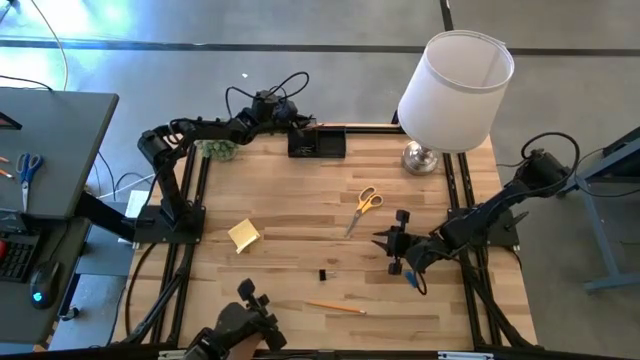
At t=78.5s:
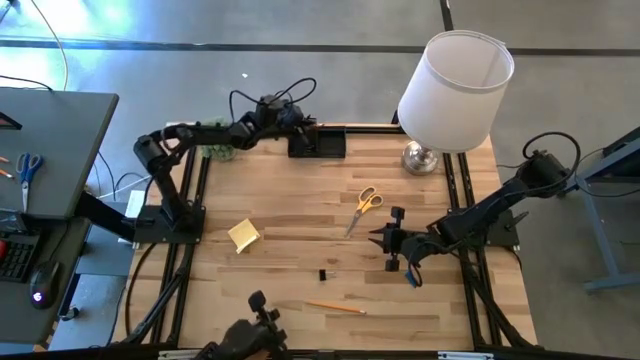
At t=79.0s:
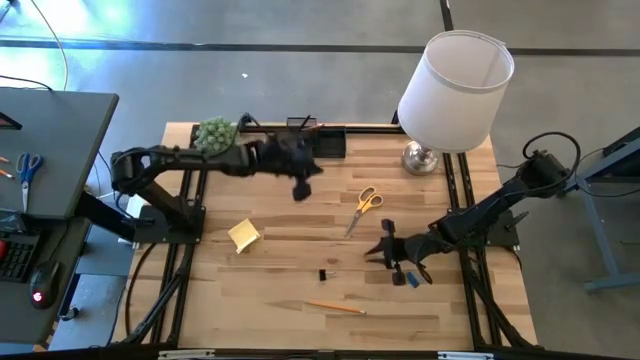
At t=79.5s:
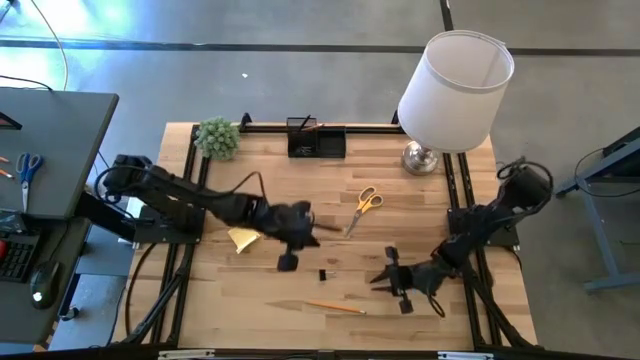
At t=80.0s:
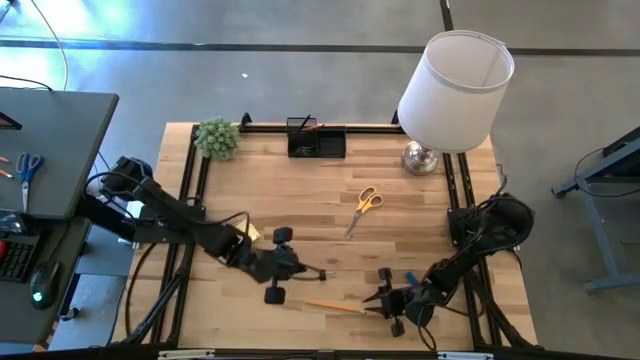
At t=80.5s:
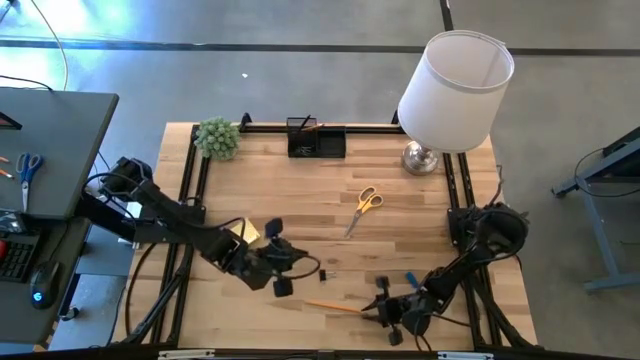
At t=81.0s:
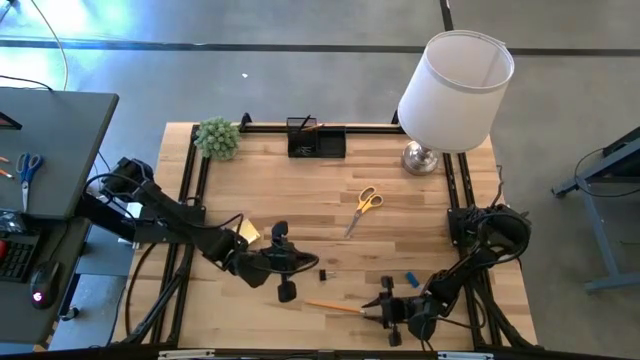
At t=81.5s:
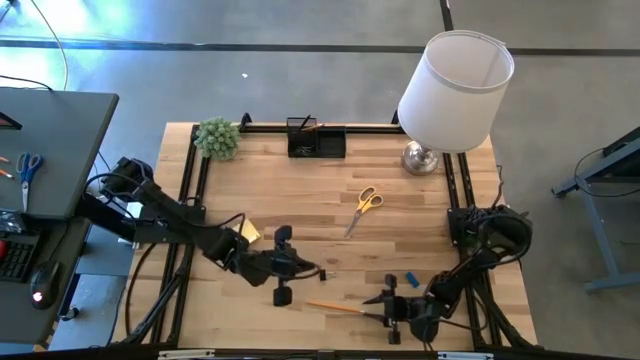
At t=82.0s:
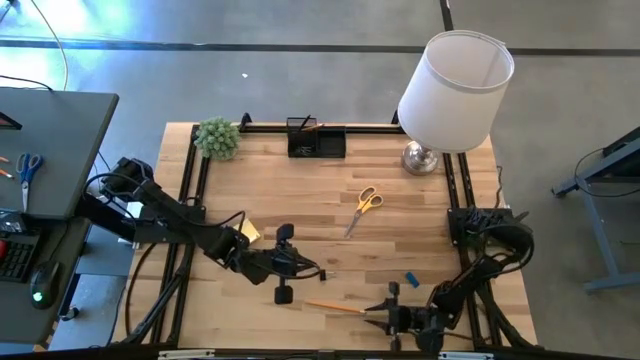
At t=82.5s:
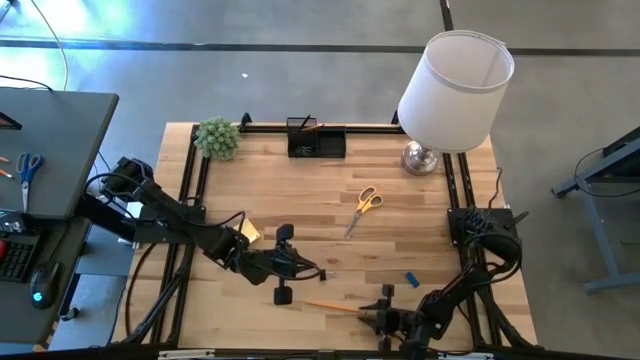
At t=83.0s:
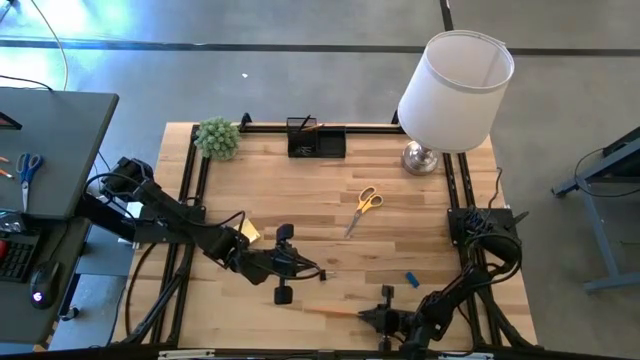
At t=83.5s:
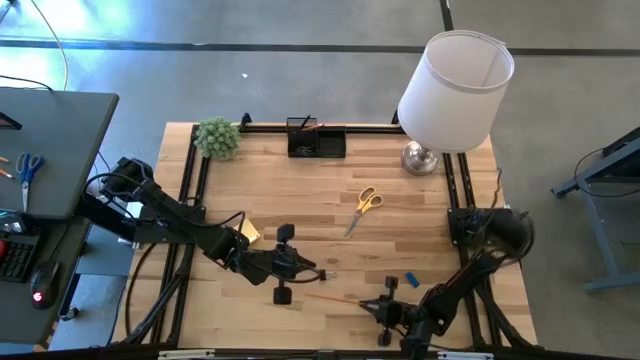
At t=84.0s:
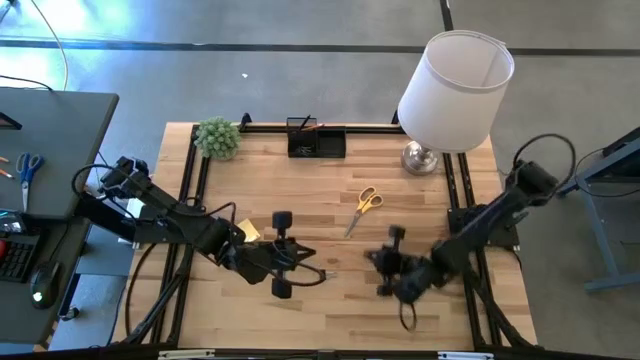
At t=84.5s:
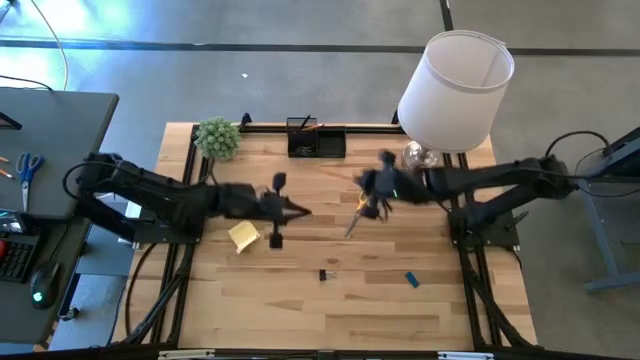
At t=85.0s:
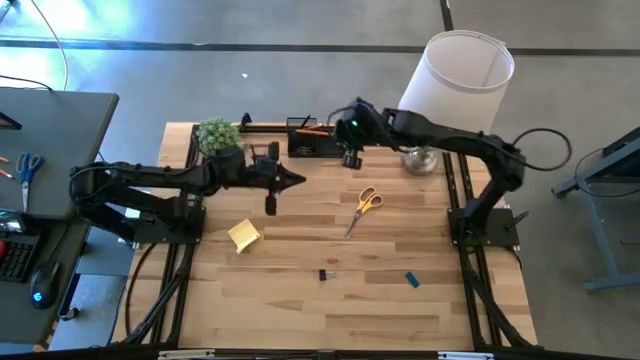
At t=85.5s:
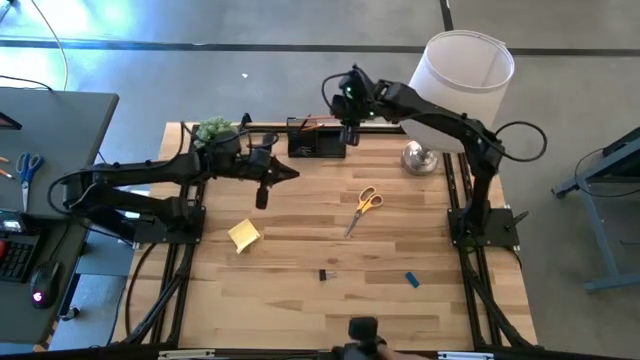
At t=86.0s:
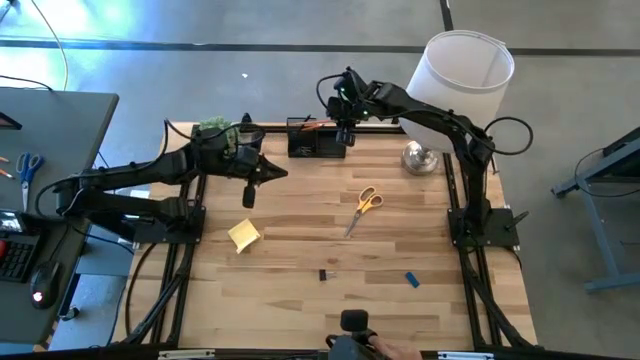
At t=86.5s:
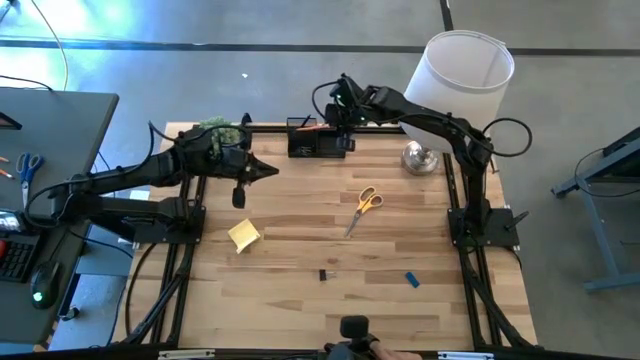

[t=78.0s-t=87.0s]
Task: Pick and place office supplies into organizer
Put the yellow pencil into the top left slot of the desk organizer

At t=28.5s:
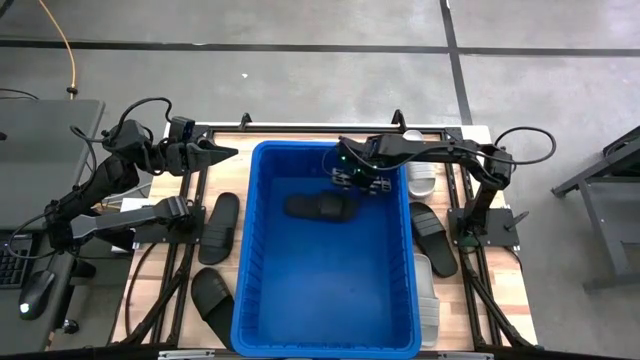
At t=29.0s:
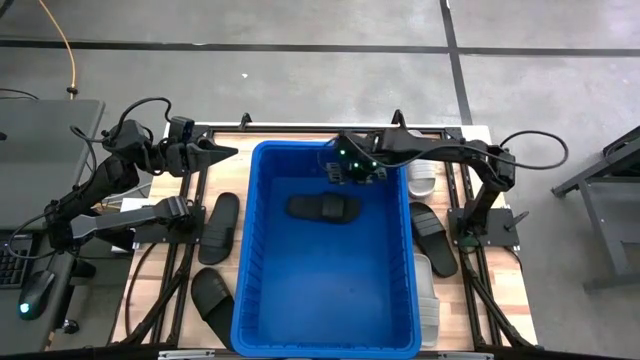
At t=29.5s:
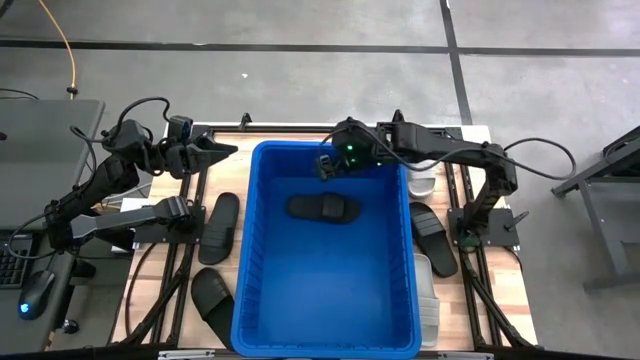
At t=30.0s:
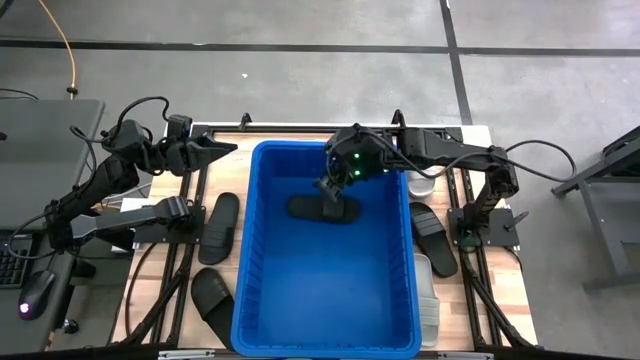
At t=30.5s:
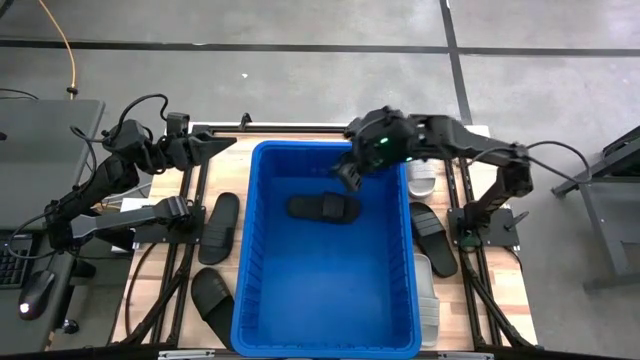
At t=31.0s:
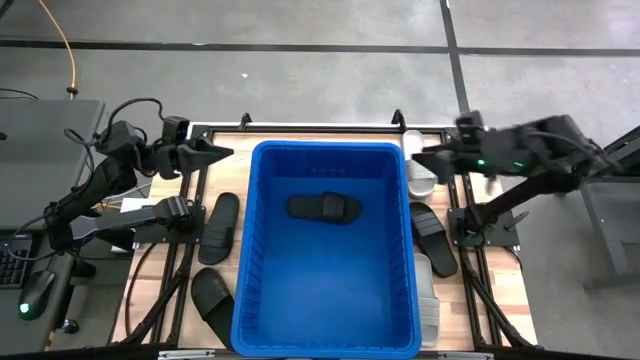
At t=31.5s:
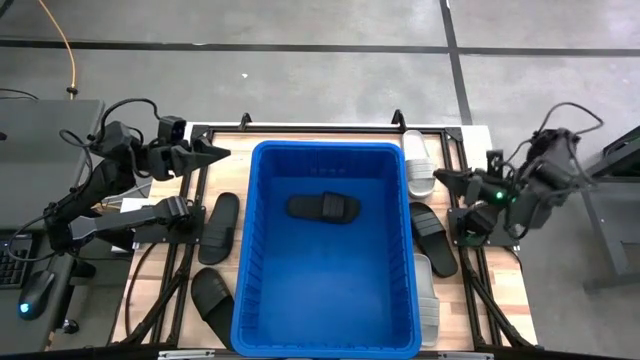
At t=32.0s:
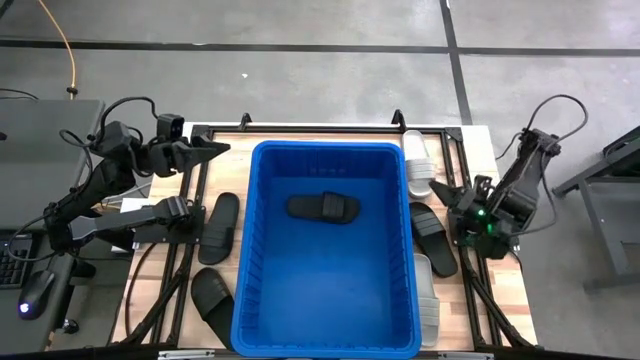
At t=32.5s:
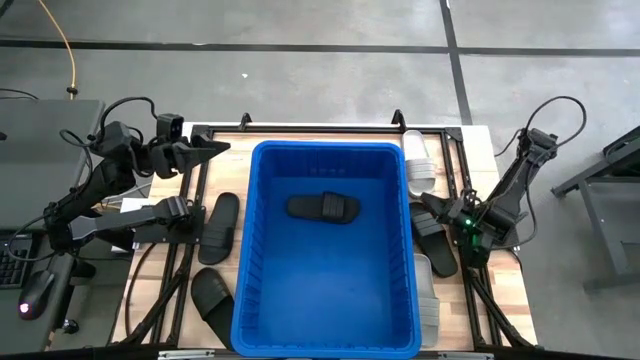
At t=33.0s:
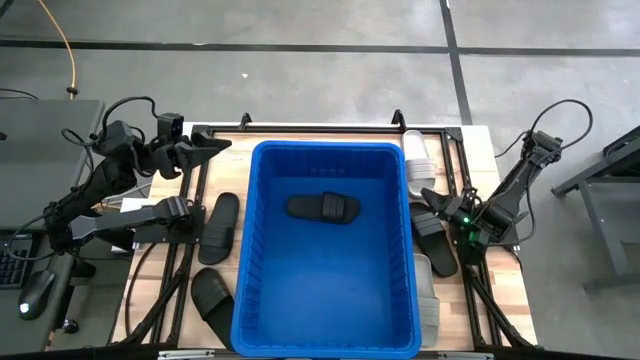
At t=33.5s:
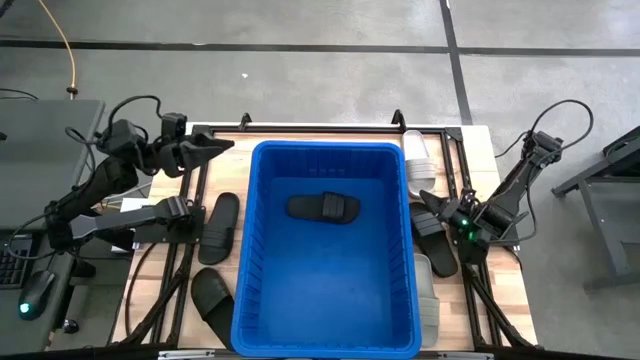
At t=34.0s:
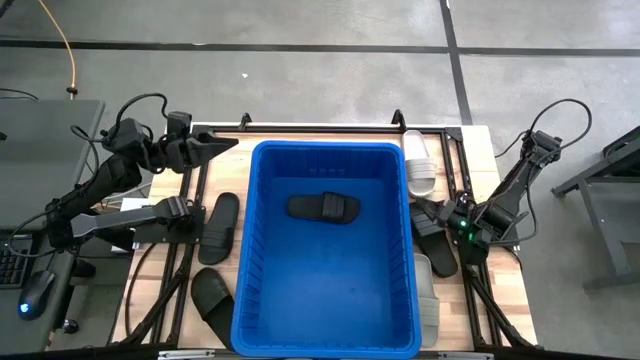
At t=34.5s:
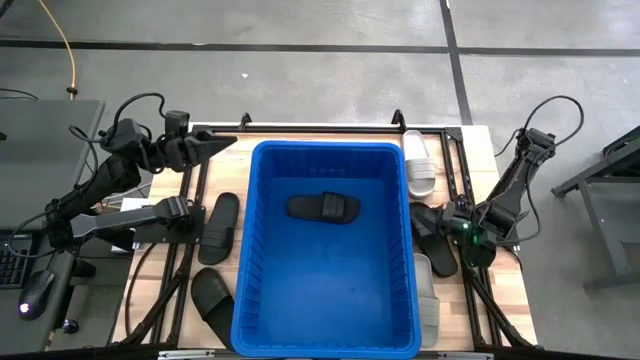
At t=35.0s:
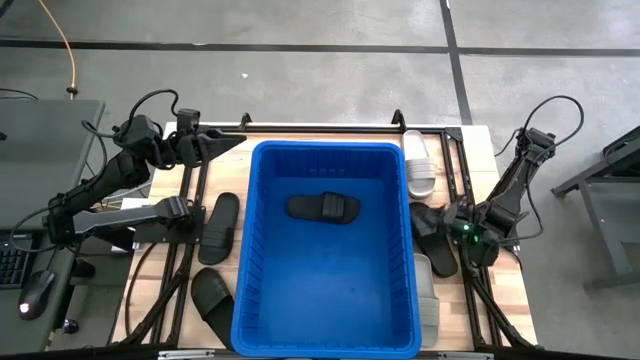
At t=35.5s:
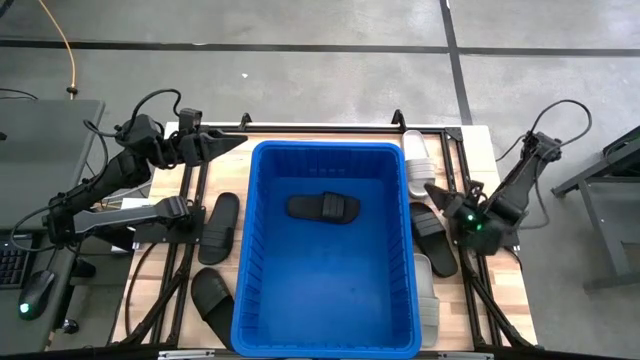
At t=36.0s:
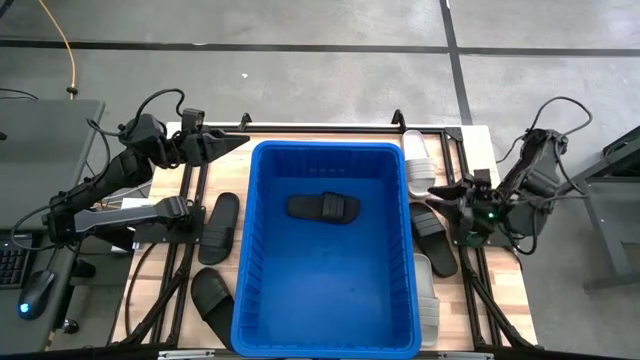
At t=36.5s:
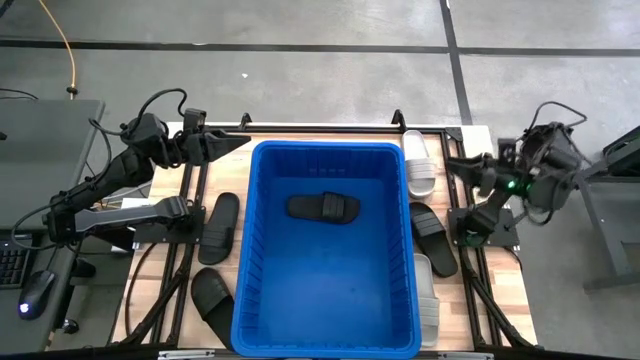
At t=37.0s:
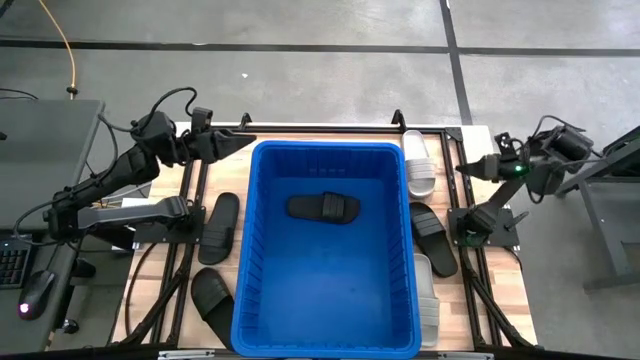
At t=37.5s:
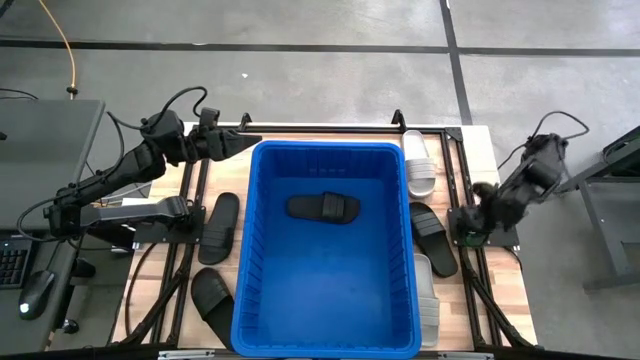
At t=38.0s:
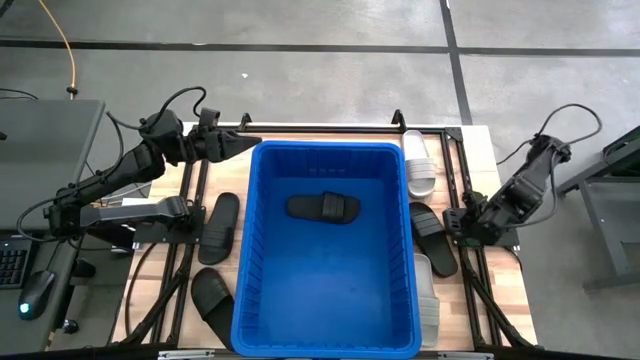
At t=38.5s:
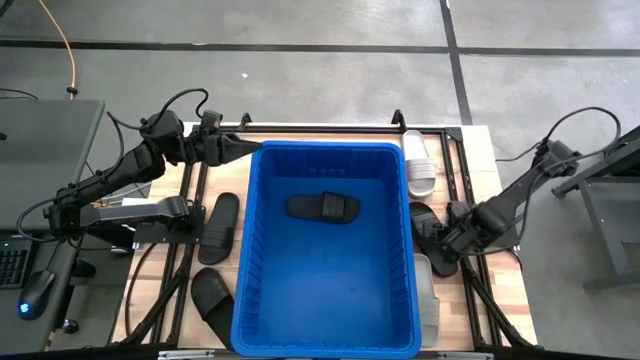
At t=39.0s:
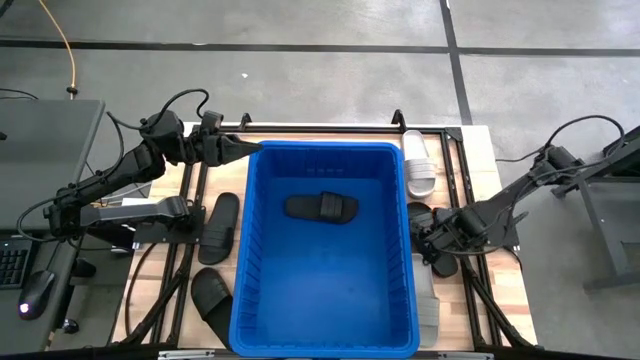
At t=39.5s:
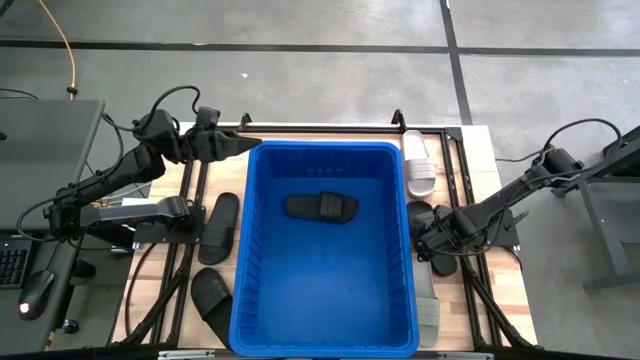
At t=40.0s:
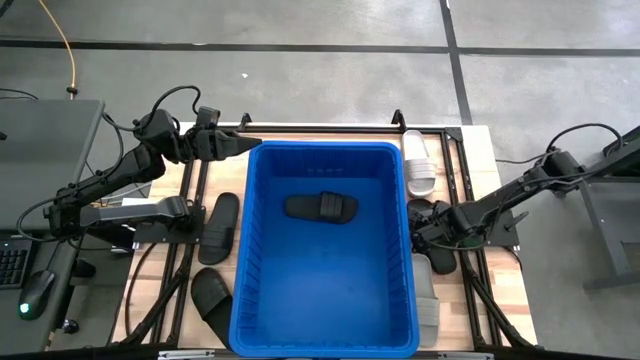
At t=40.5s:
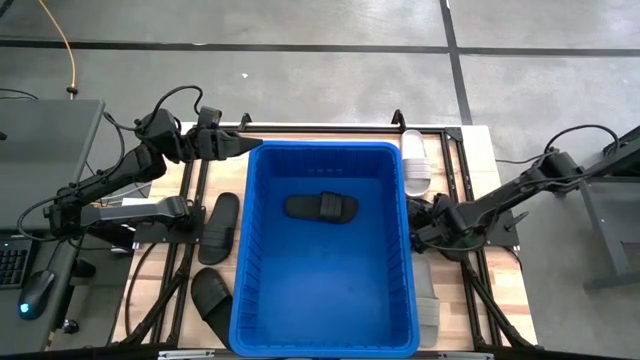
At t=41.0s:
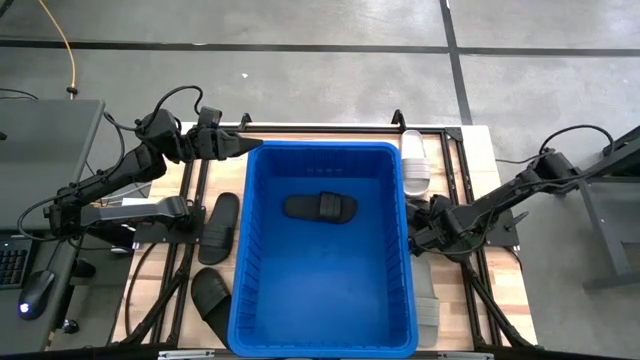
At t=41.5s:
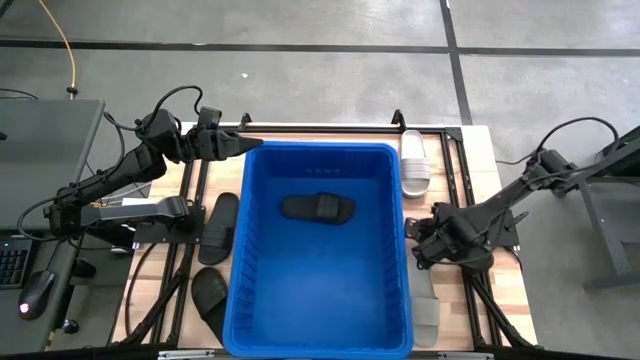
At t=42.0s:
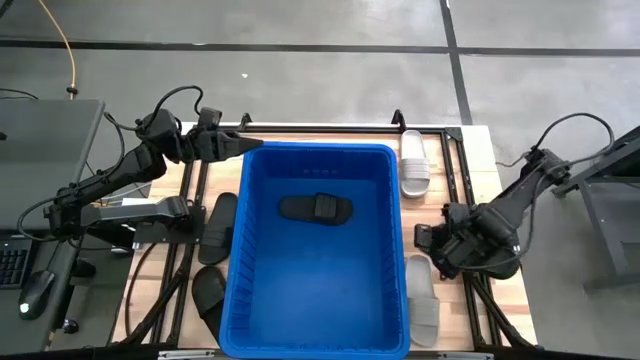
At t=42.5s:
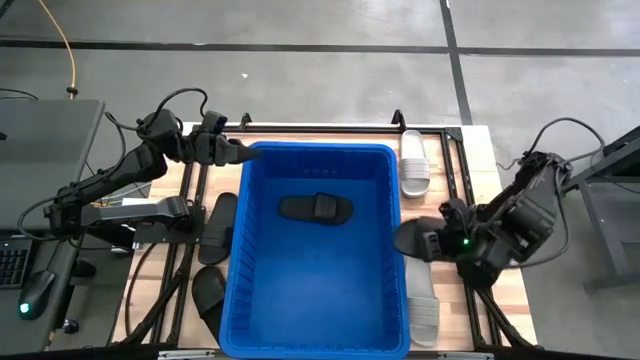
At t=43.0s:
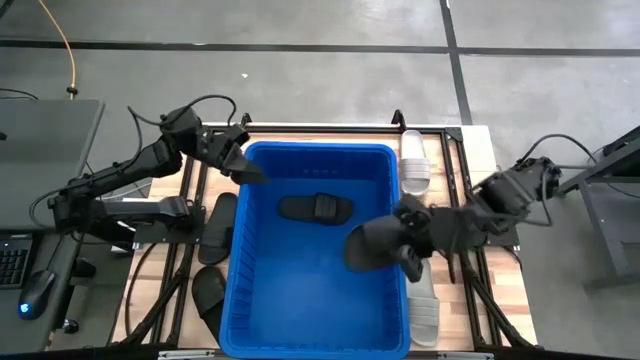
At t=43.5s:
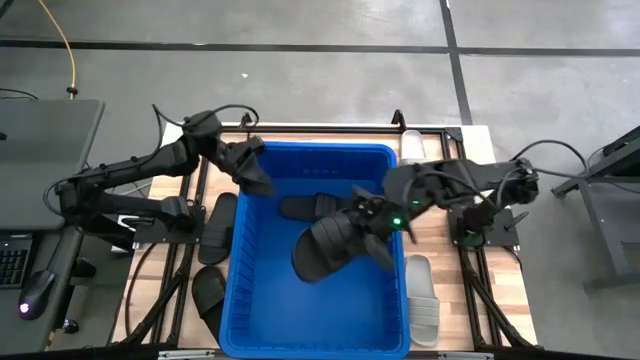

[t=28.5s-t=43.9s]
Task: Pick and place slides into bin
Put the right black slide in the bin
